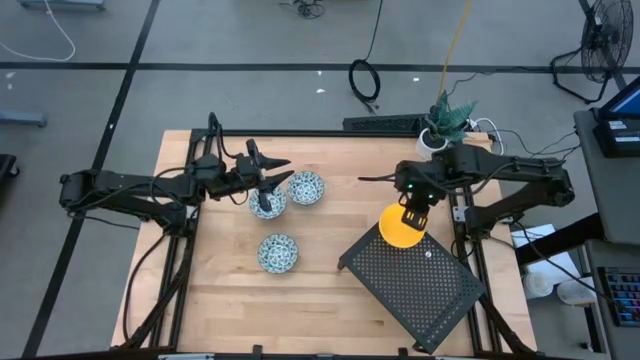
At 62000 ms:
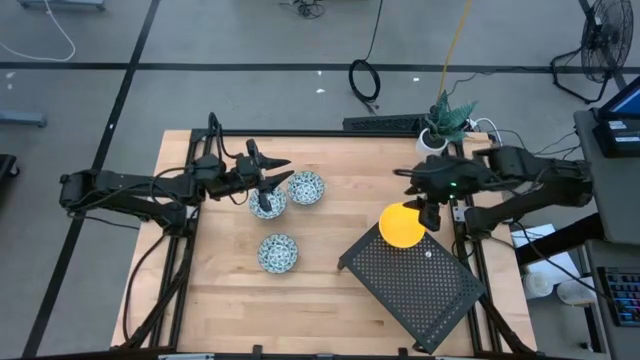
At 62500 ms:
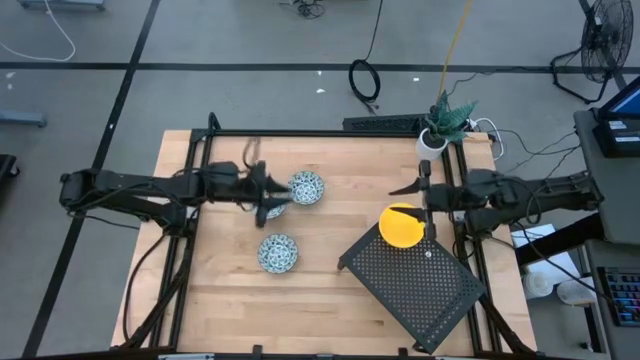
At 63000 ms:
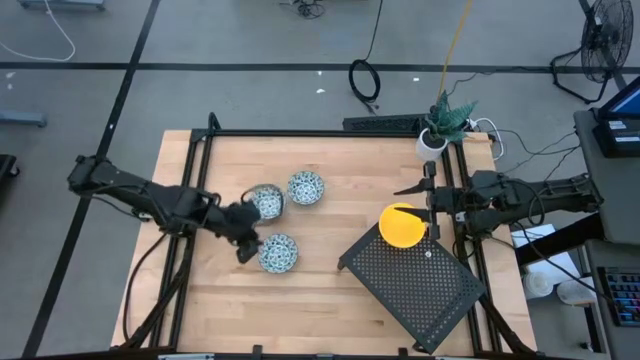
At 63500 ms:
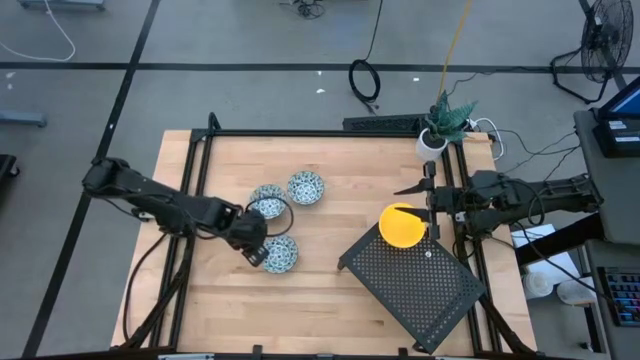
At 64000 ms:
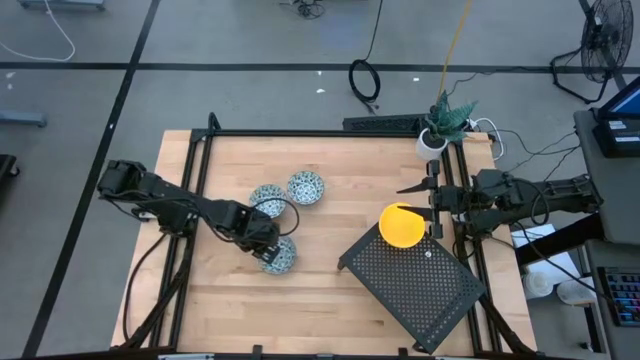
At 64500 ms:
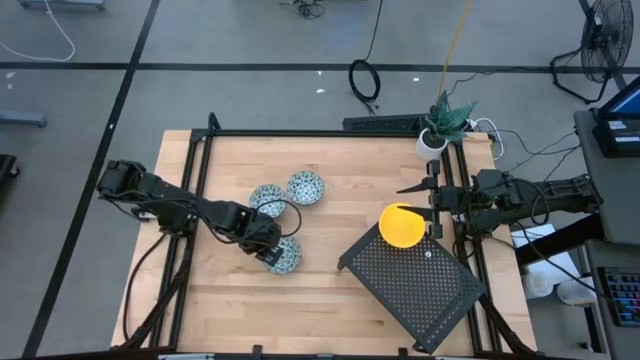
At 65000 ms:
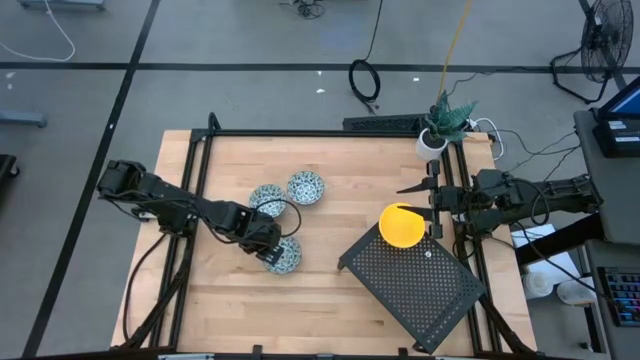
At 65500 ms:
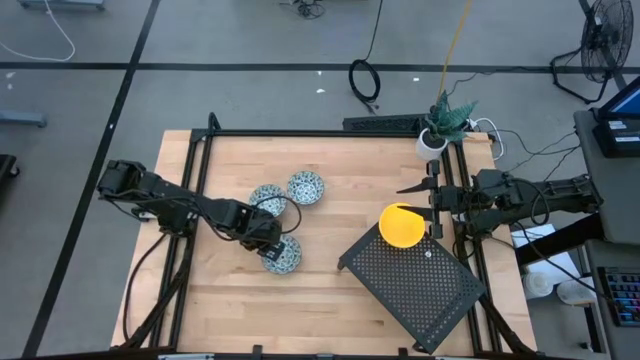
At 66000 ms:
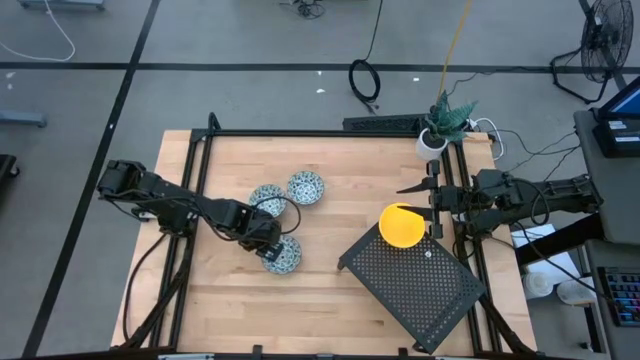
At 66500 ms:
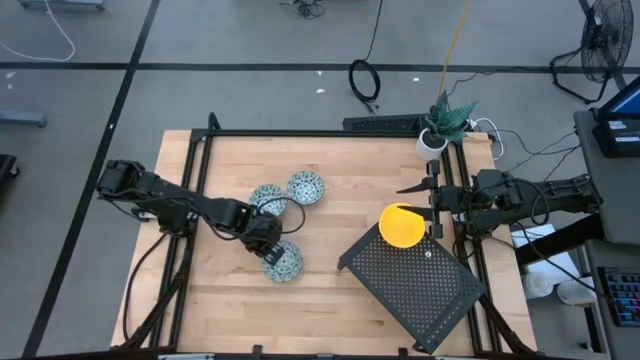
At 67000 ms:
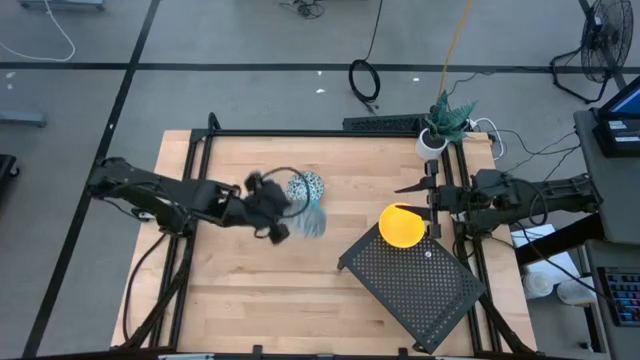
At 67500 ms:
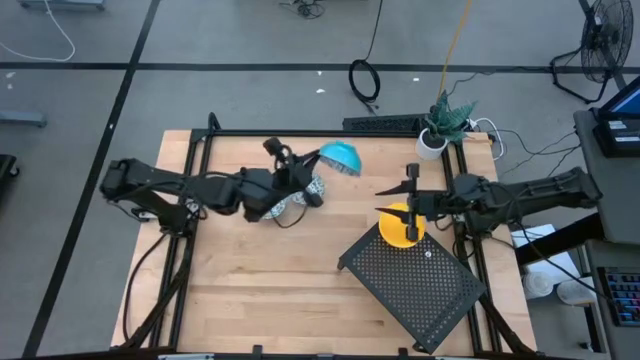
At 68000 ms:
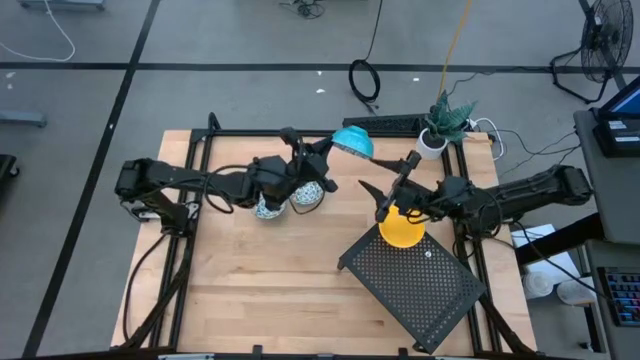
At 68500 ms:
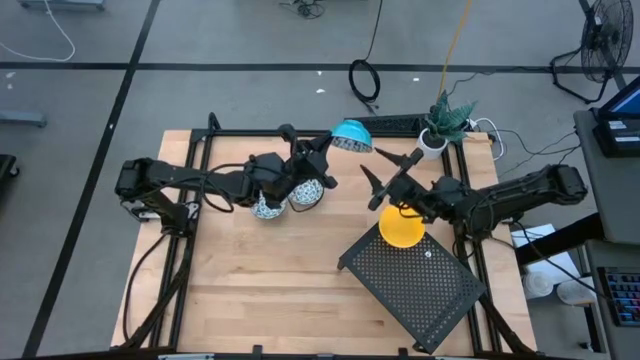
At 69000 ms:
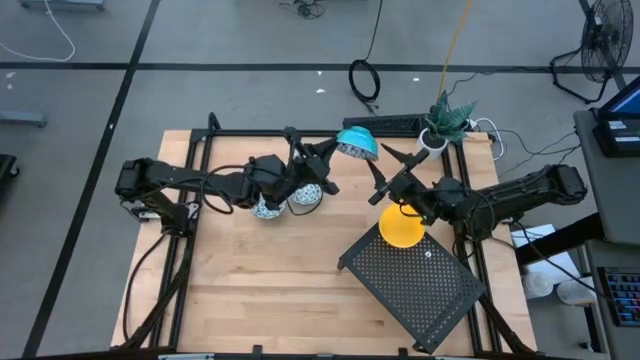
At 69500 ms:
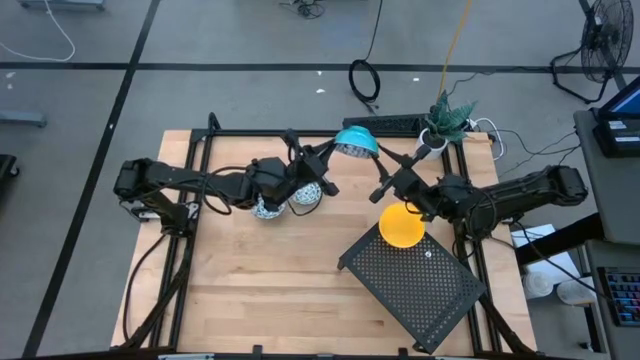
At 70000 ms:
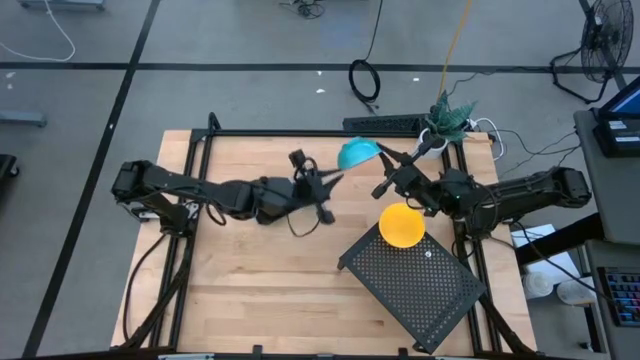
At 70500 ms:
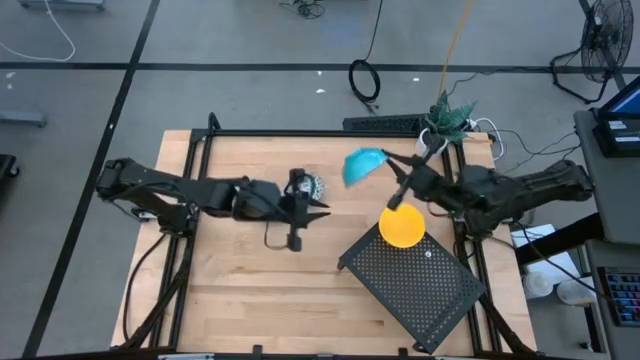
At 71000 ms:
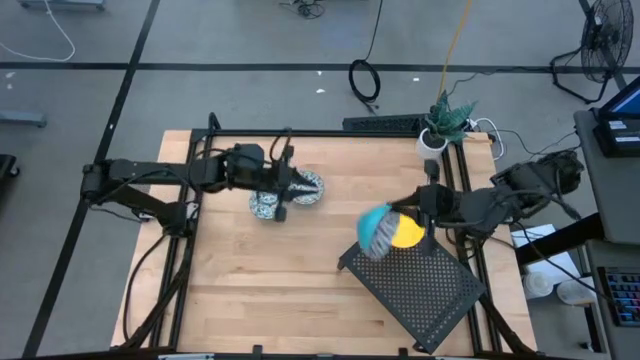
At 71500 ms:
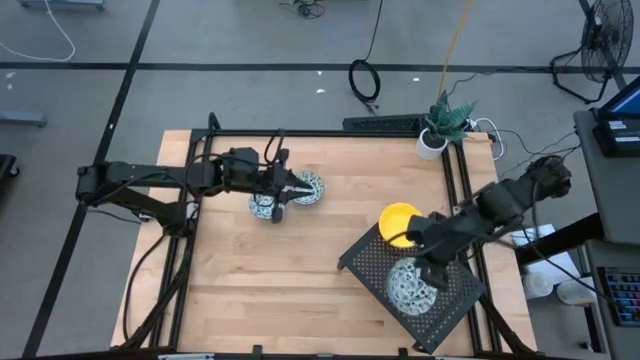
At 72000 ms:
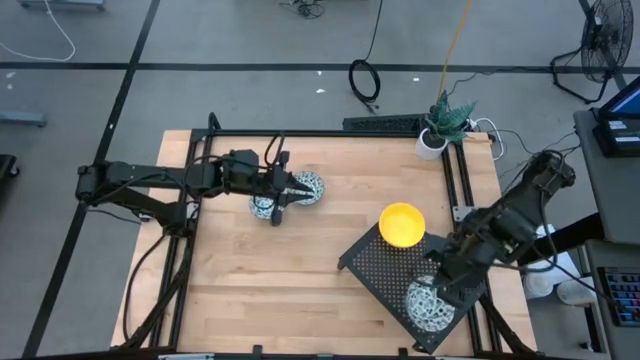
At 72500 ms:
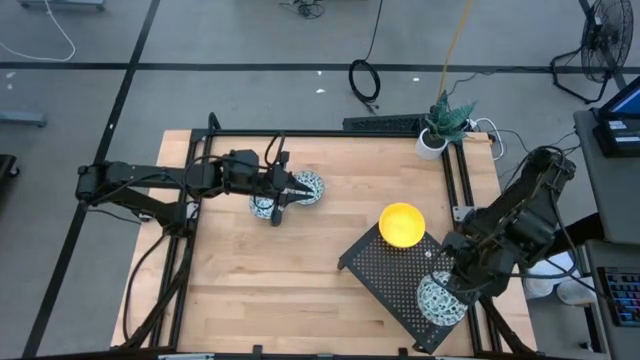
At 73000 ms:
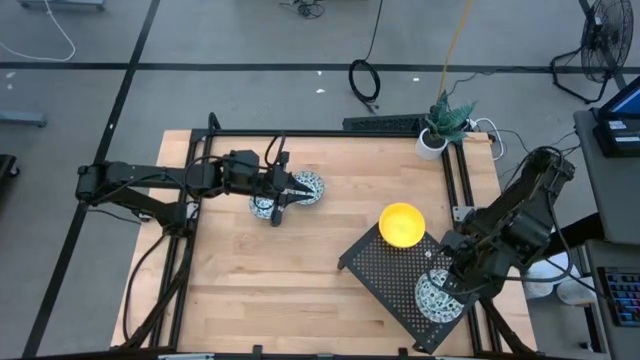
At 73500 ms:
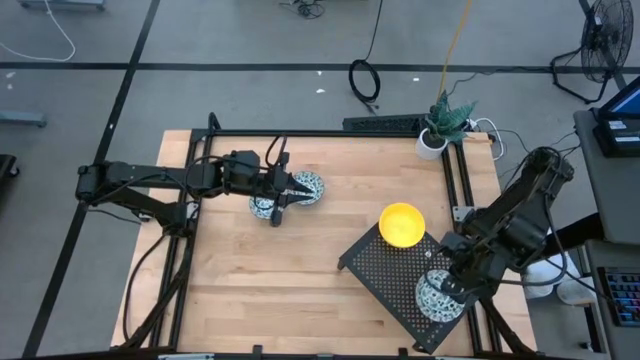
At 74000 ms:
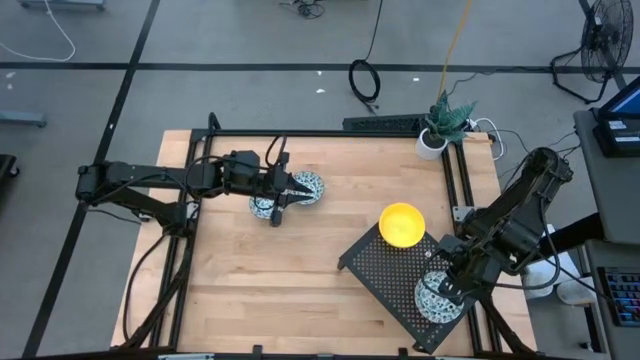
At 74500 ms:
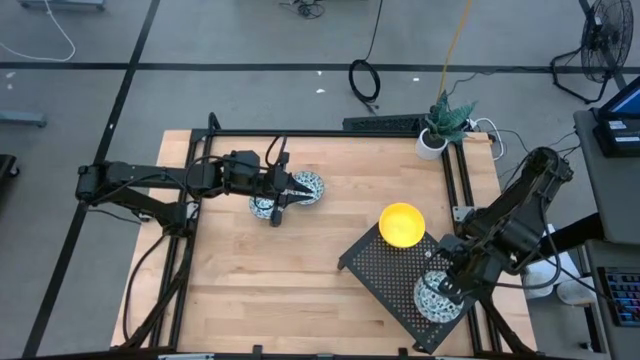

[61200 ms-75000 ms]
Task: Pick & Place Mini bowls
Put the blue patterned bowl on the shelf

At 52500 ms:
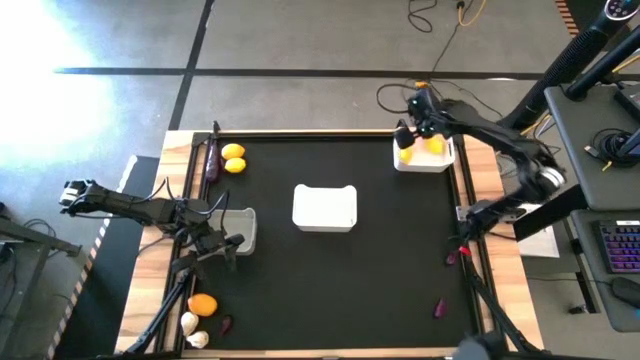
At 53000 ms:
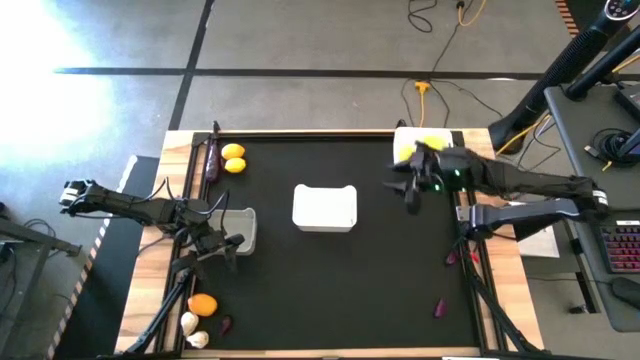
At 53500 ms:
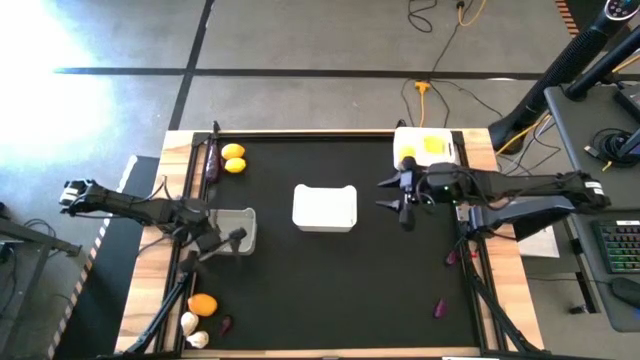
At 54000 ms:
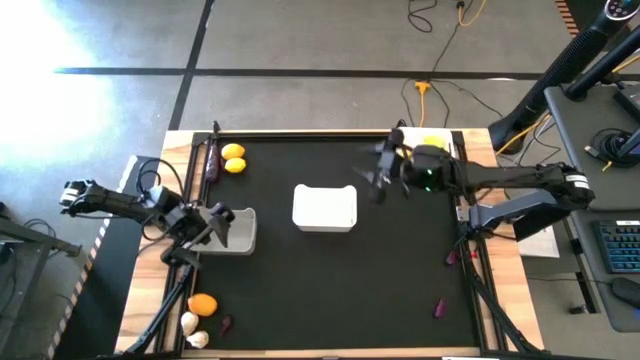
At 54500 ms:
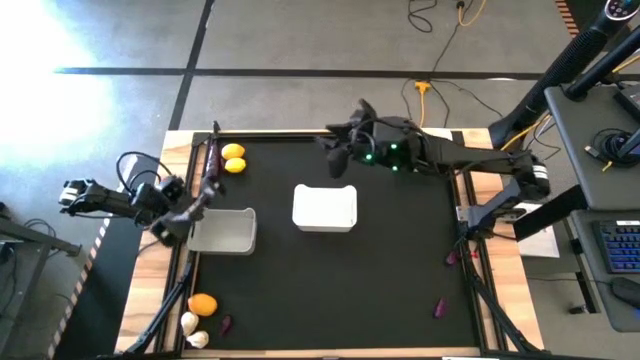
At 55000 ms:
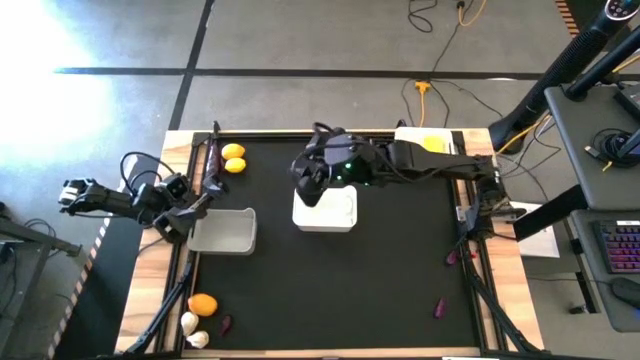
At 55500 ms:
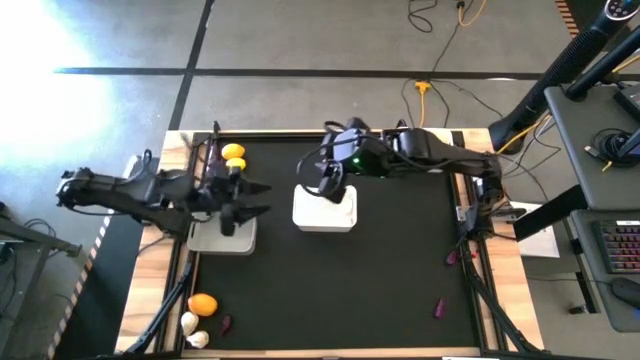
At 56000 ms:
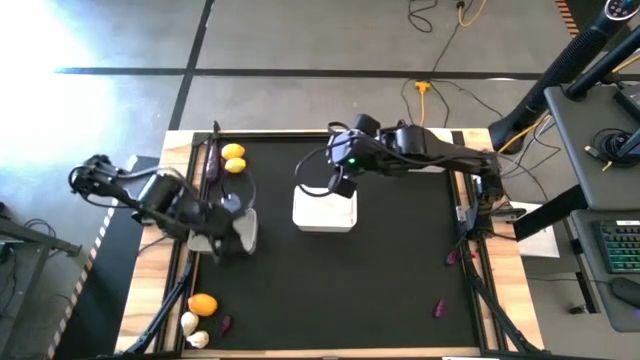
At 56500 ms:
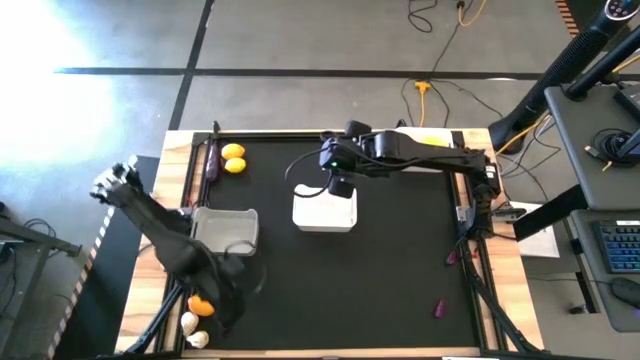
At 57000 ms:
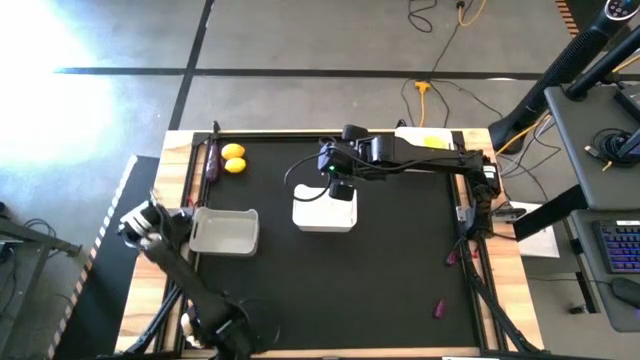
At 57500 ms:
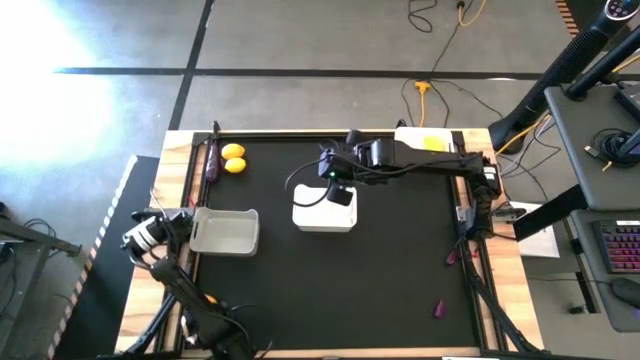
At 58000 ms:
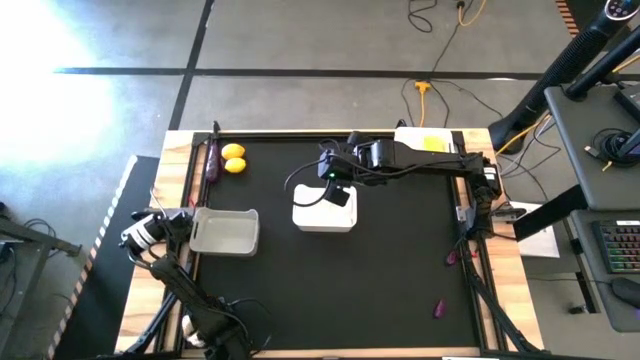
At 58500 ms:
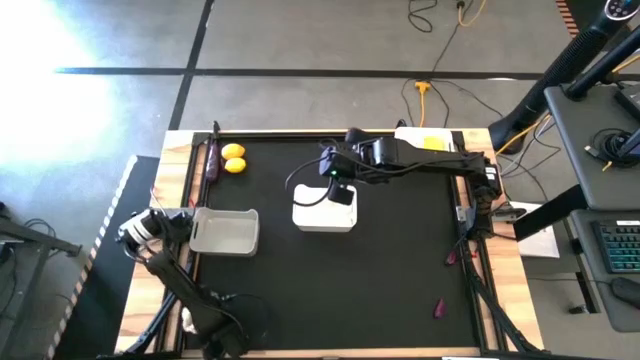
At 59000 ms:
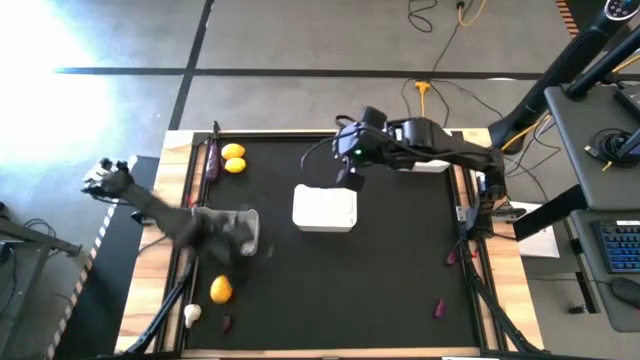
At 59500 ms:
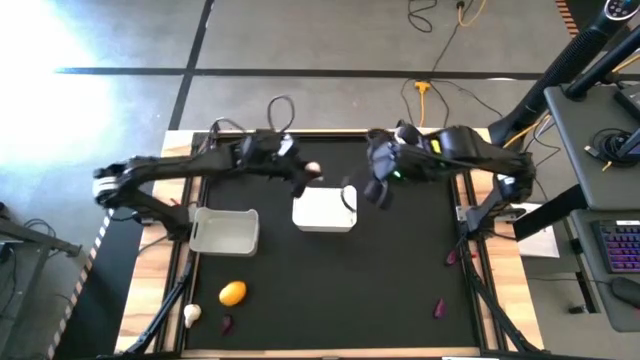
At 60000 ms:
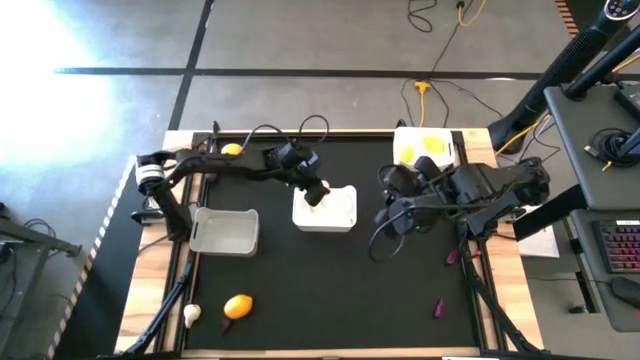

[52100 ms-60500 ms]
Task: Sort produce into baskets
Put the white garlic into the bottom white bin
